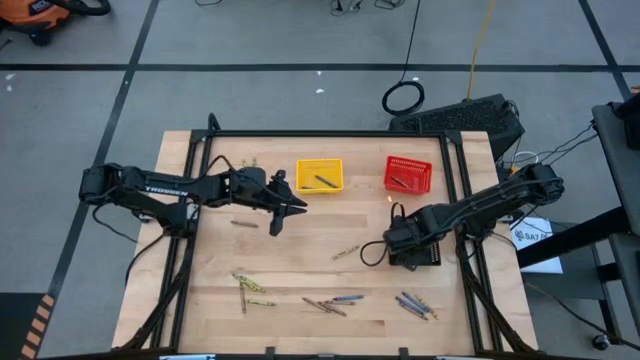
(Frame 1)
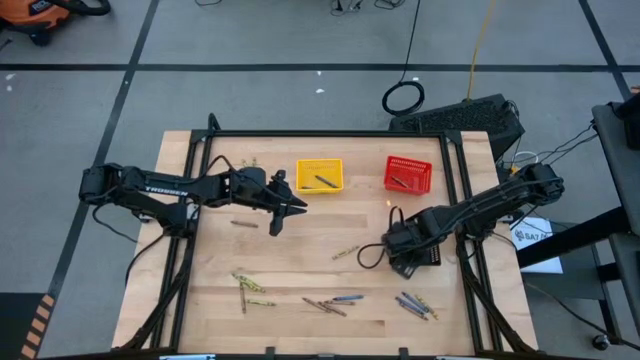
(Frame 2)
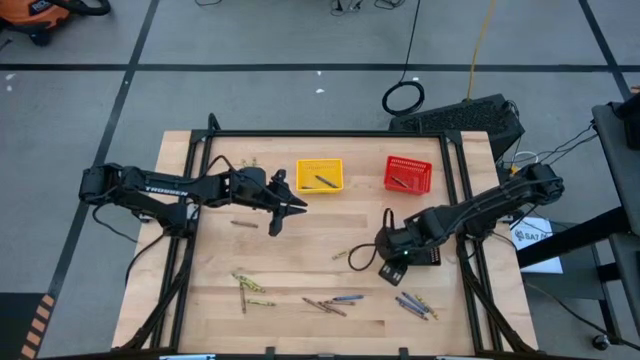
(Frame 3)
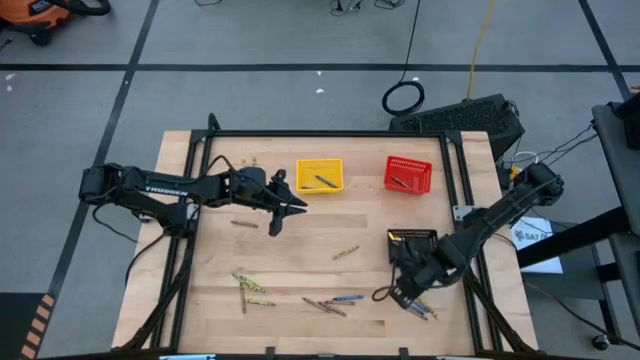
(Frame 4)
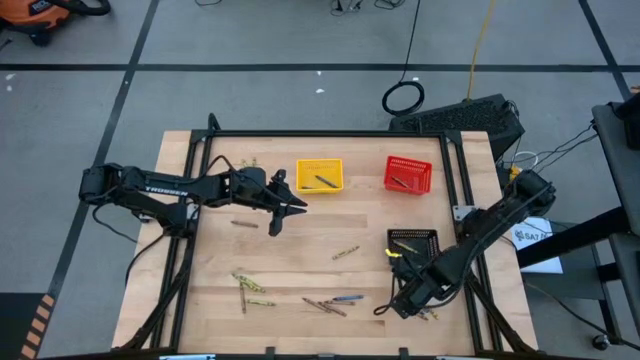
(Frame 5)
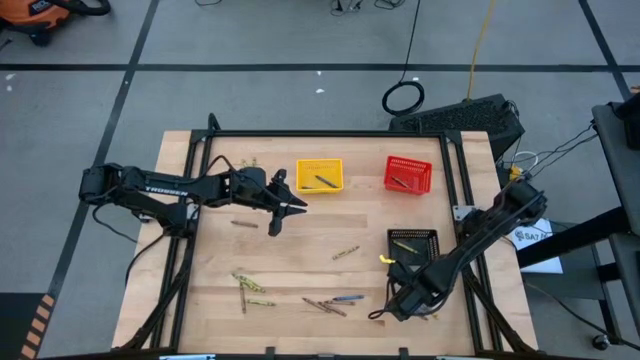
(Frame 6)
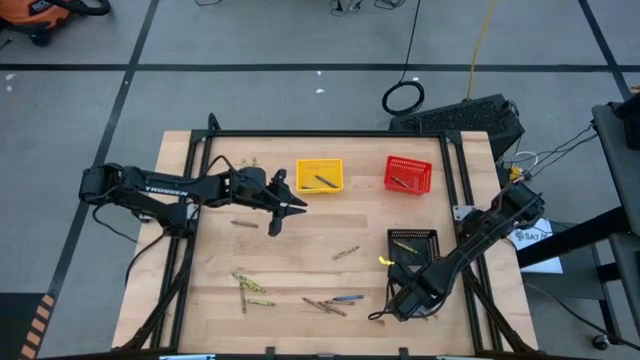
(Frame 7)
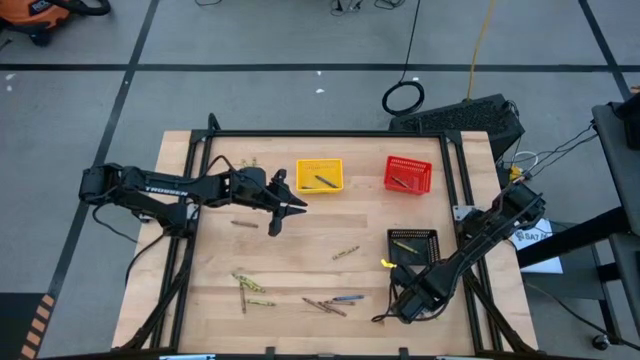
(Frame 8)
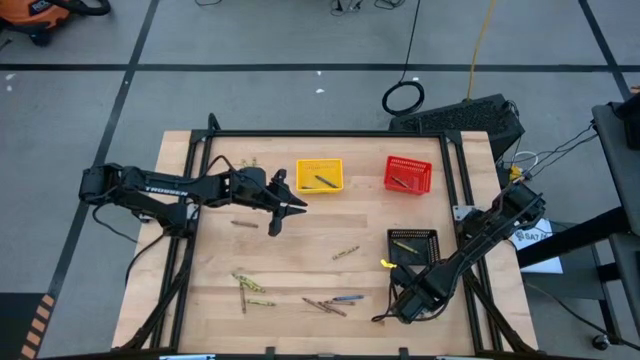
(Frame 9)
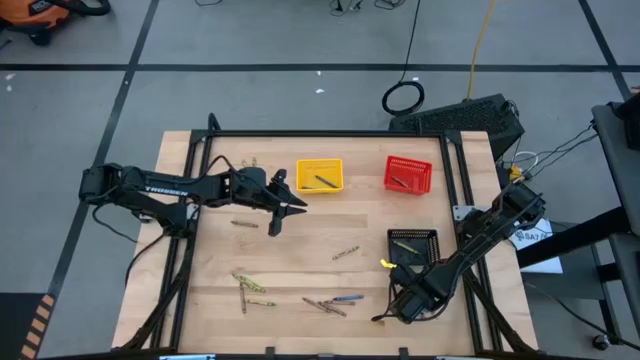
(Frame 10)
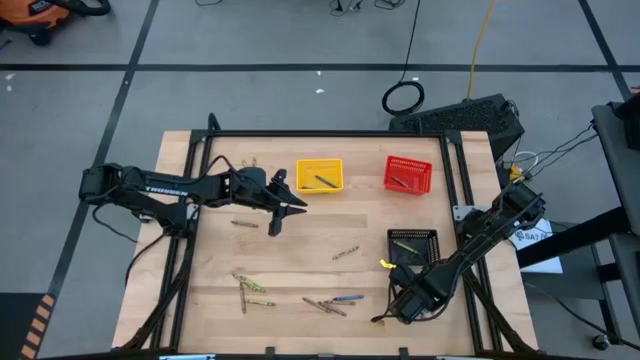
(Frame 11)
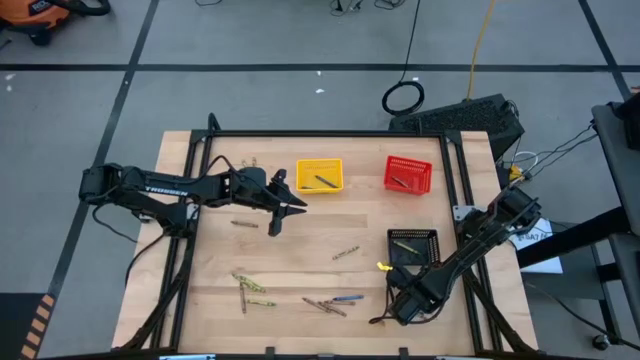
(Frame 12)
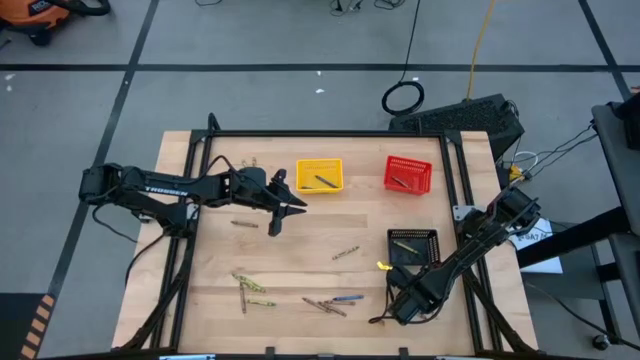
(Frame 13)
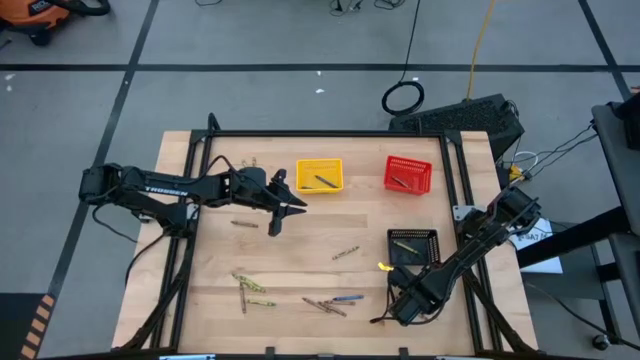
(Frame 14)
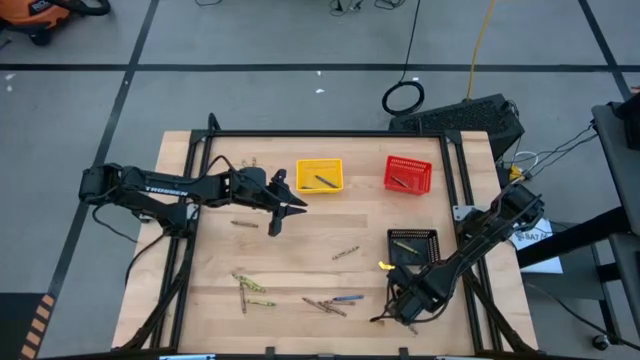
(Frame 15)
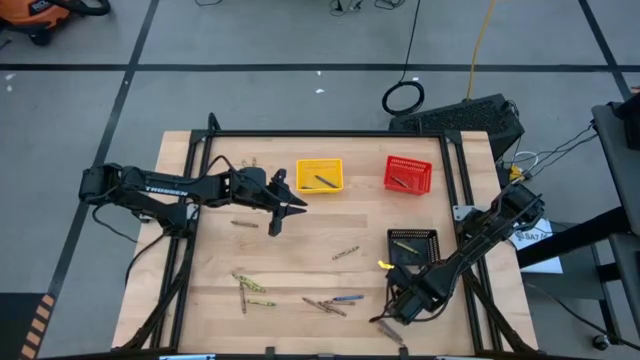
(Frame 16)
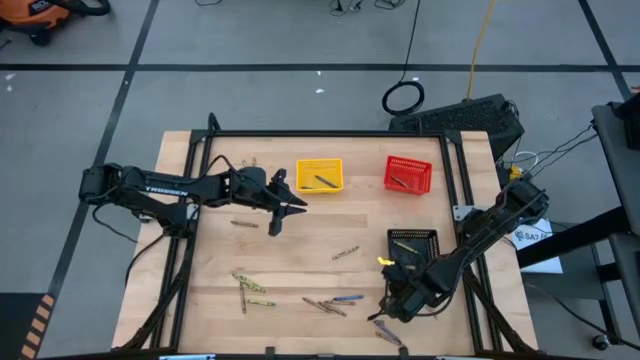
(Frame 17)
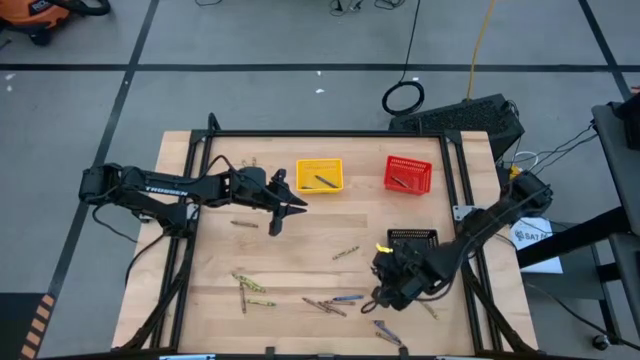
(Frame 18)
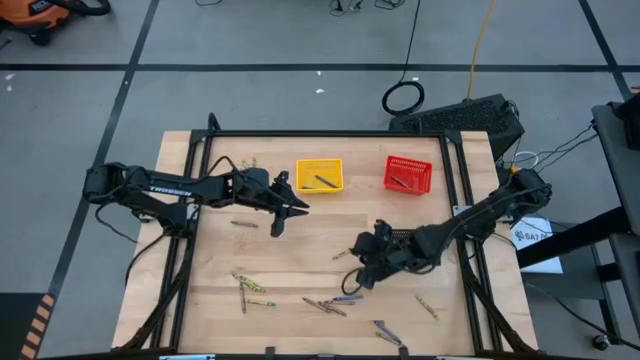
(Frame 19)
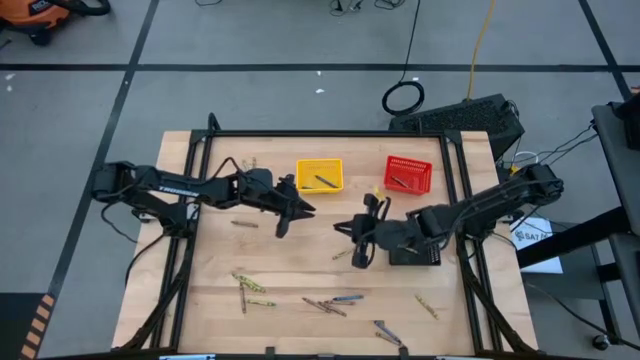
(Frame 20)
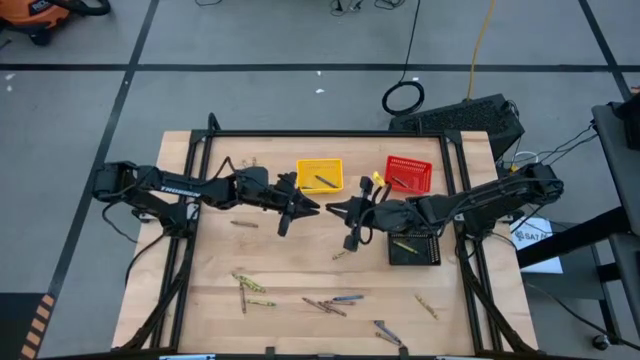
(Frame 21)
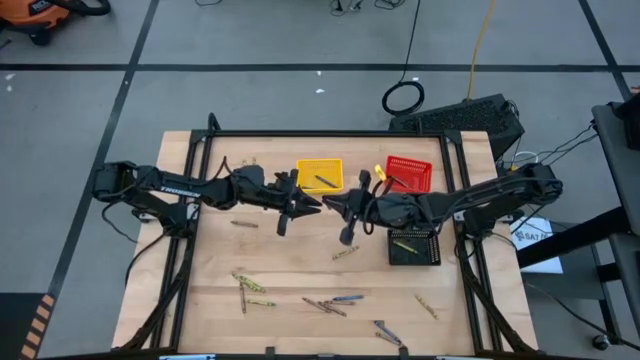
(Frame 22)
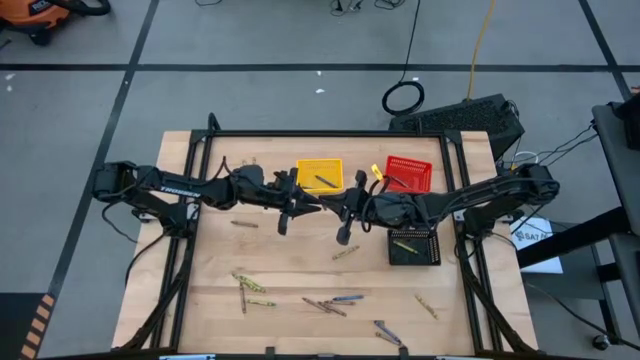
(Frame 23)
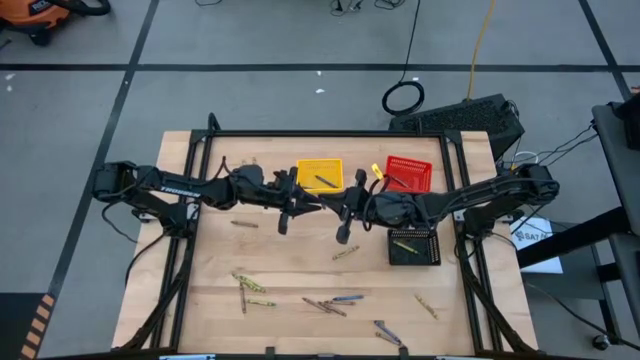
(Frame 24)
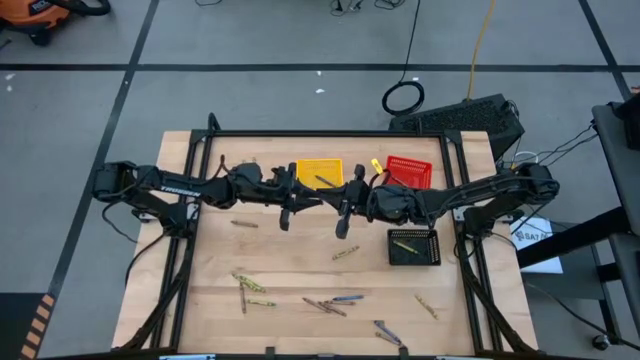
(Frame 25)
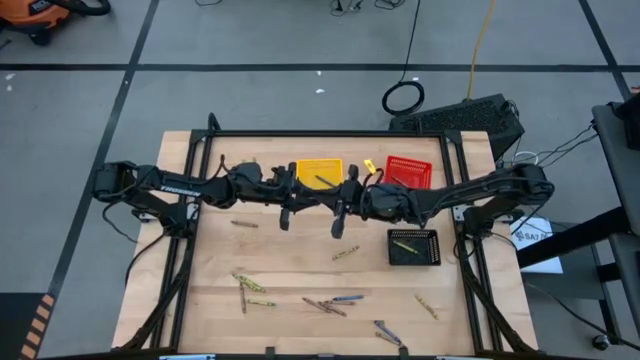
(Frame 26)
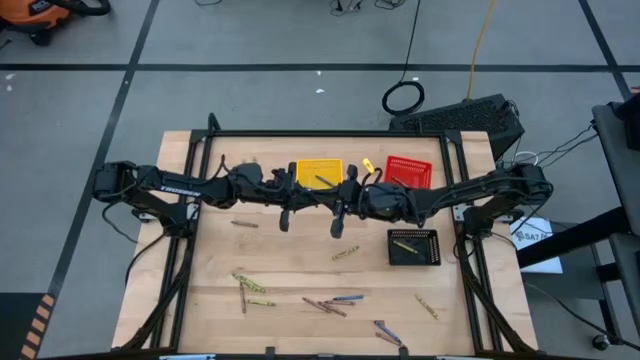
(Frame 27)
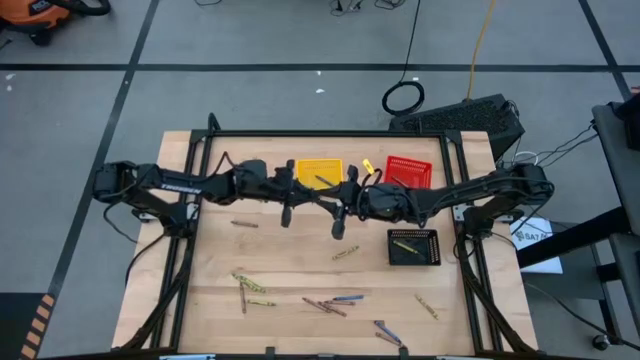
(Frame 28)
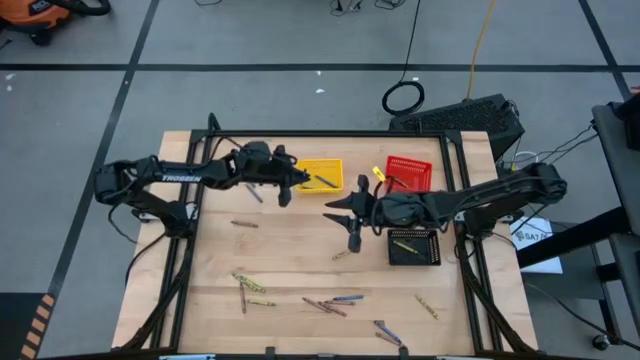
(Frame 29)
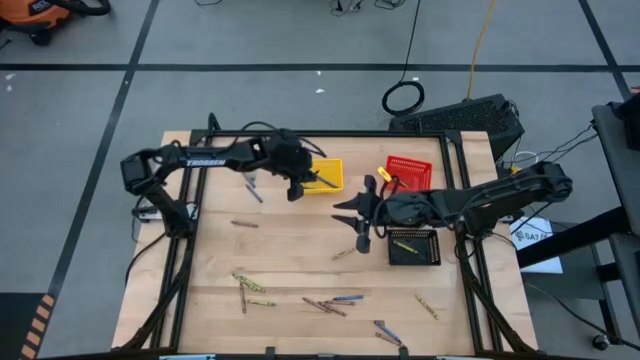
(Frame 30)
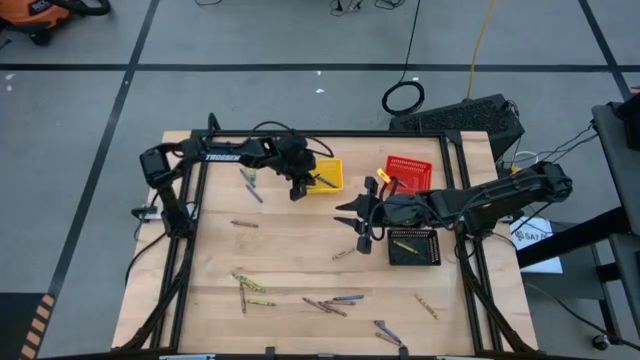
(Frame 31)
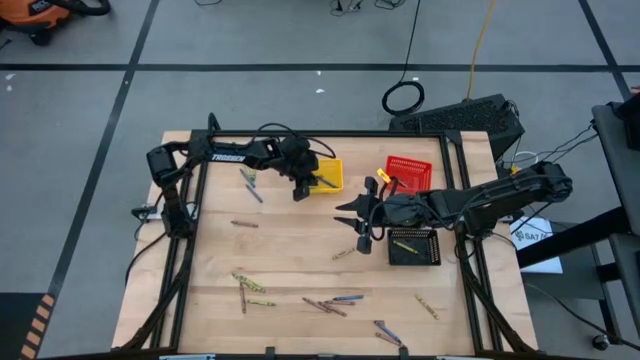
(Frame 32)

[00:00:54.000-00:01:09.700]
Task: Sort crayons
Put the blue crayon into the yellow bin

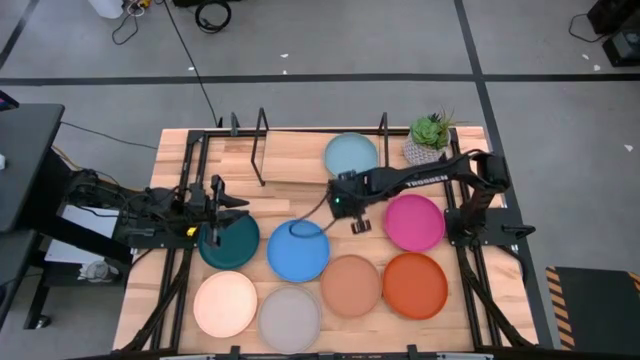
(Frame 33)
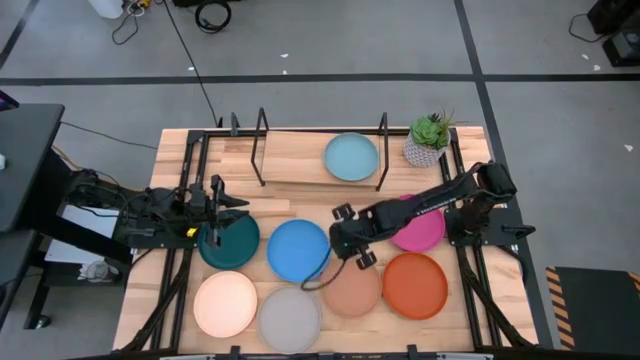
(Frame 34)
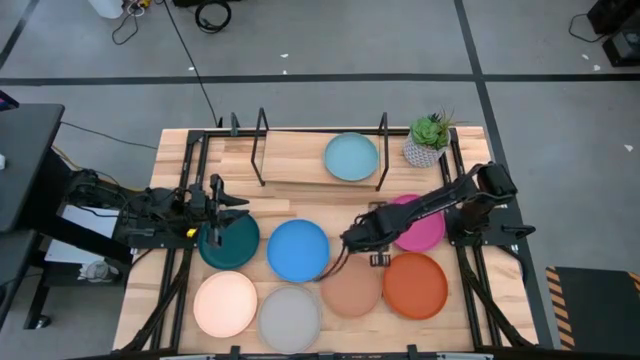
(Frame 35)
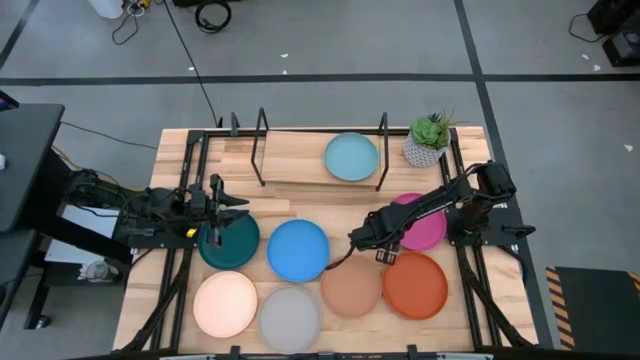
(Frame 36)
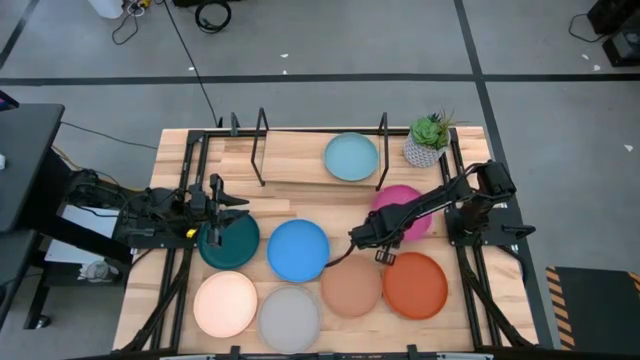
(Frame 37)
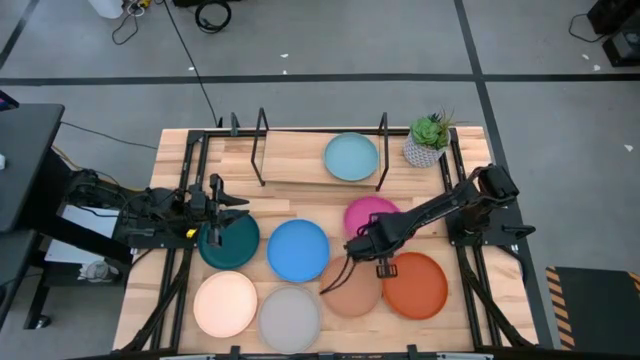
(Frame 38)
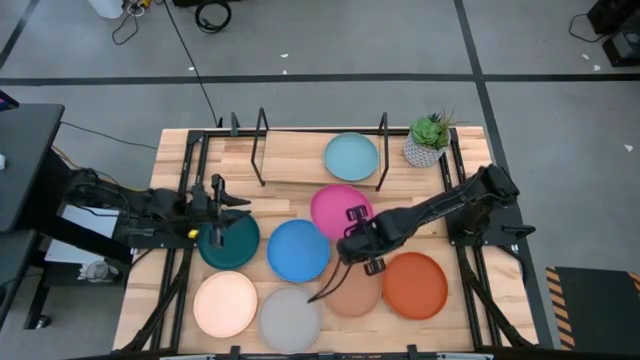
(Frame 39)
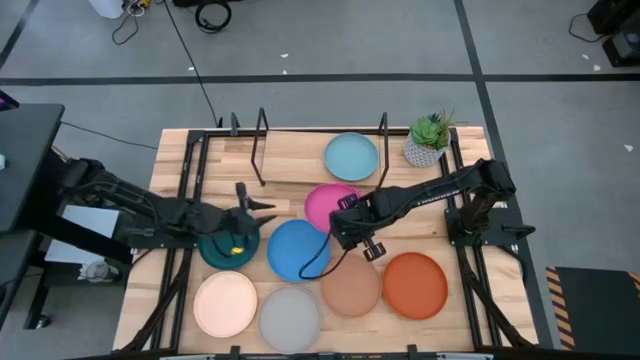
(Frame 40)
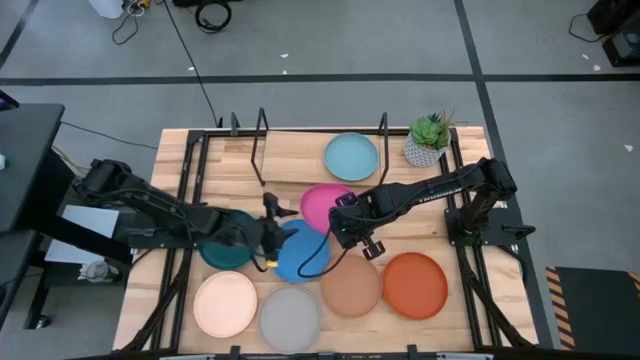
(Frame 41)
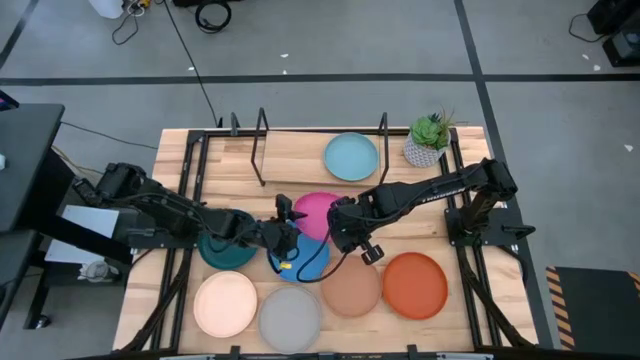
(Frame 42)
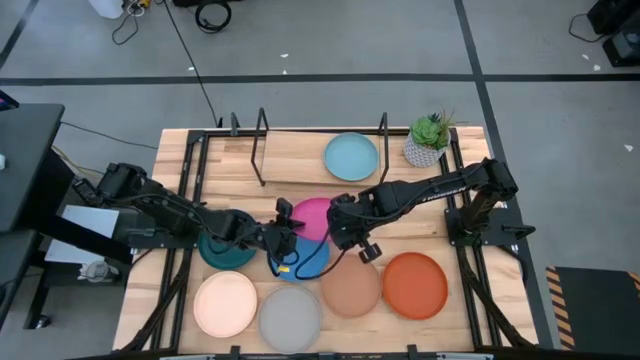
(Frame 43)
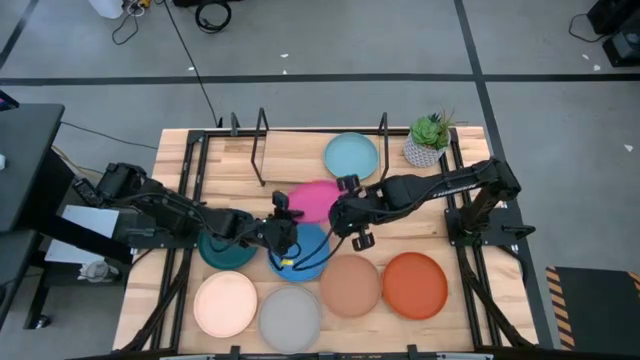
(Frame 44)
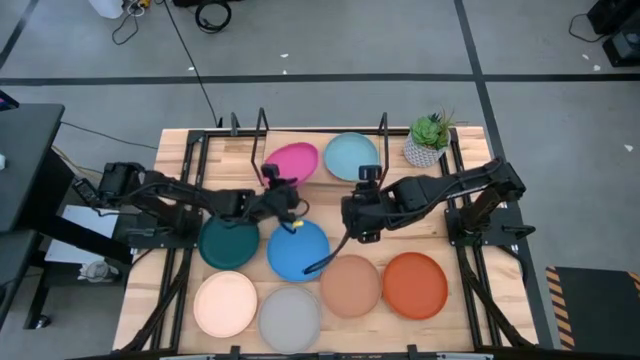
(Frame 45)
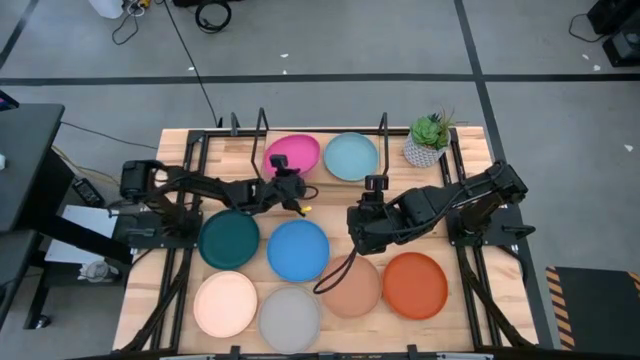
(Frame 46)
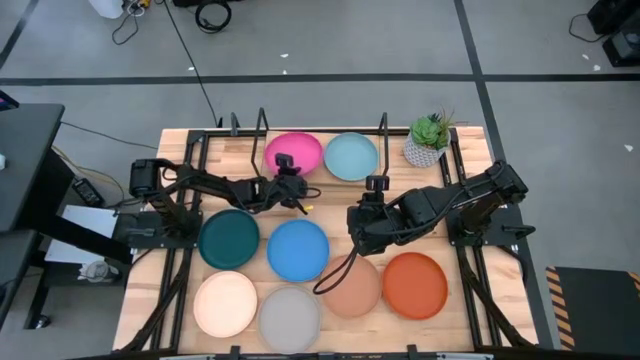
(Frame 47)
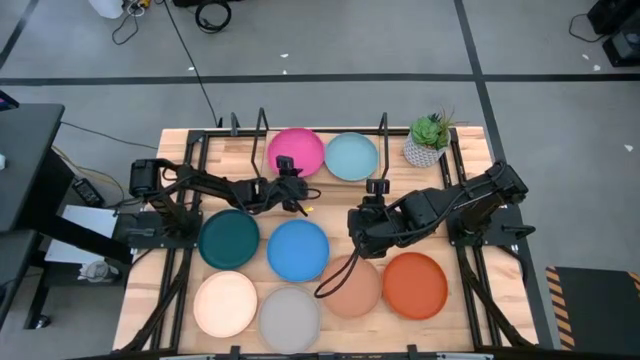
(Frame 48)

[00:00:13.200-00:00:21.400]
Task: Place and stack plates onto a shelf
Put the pink plate on the shelf
